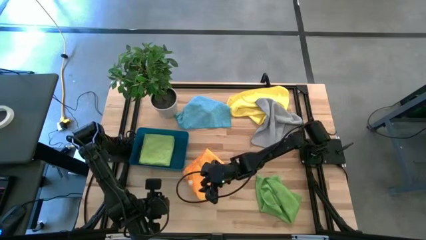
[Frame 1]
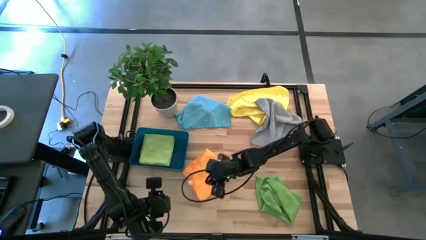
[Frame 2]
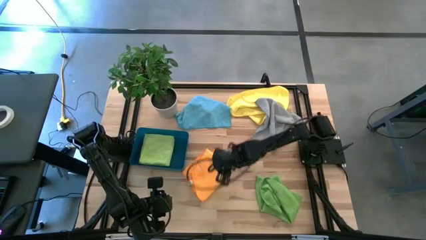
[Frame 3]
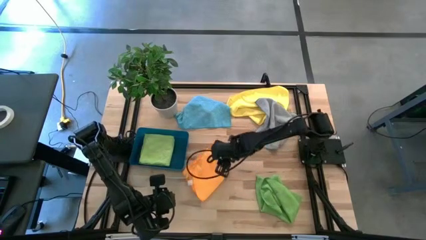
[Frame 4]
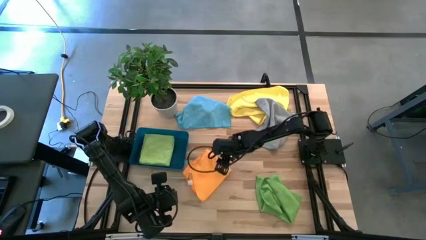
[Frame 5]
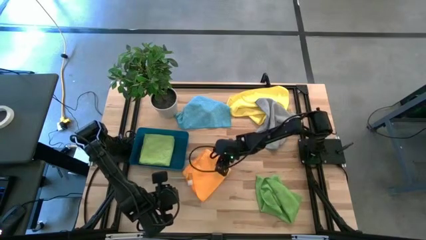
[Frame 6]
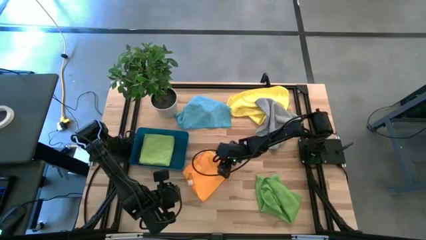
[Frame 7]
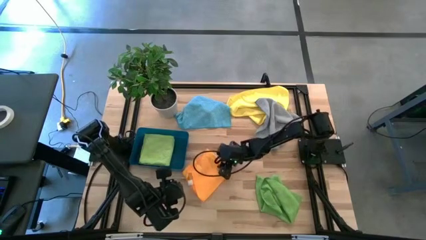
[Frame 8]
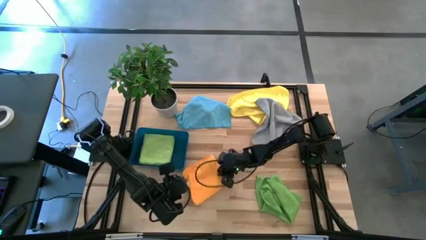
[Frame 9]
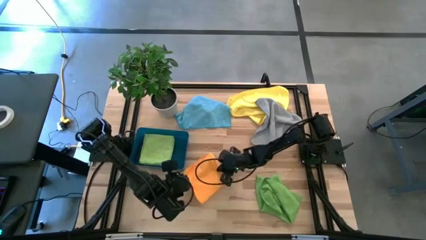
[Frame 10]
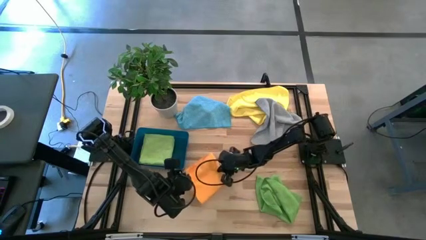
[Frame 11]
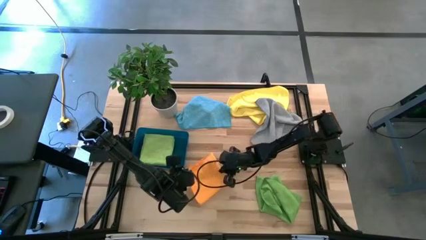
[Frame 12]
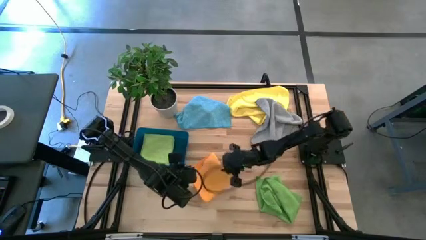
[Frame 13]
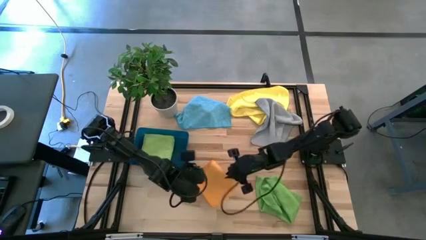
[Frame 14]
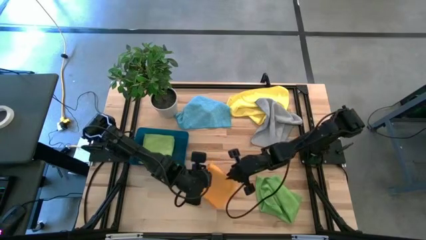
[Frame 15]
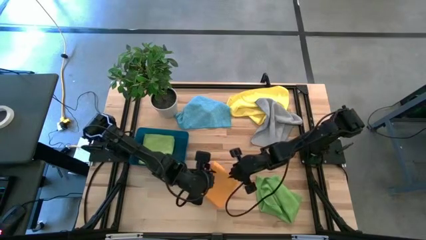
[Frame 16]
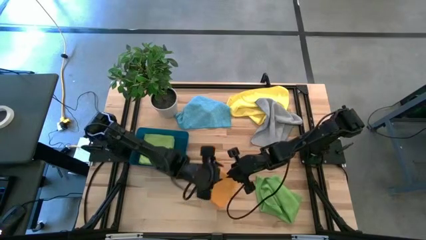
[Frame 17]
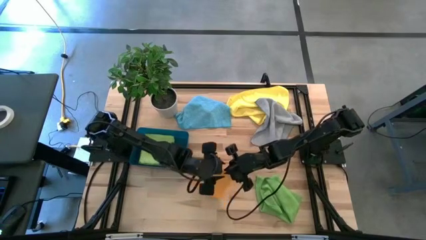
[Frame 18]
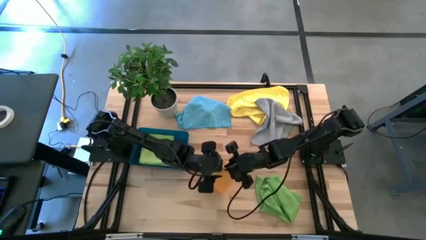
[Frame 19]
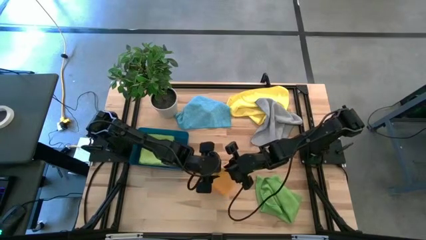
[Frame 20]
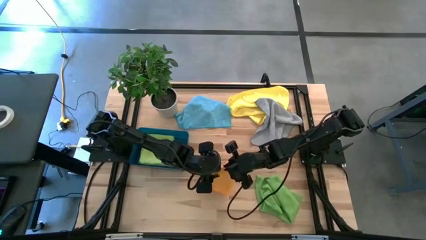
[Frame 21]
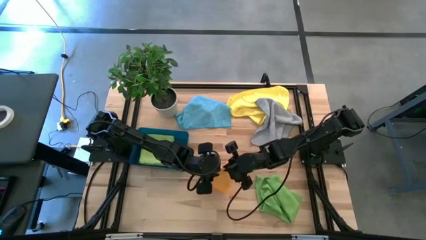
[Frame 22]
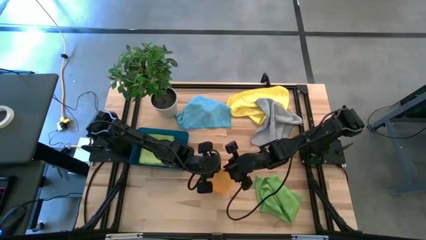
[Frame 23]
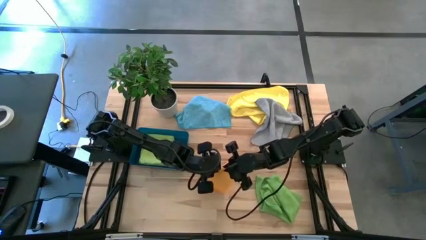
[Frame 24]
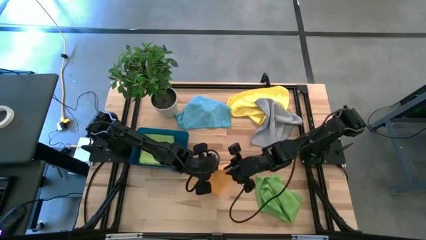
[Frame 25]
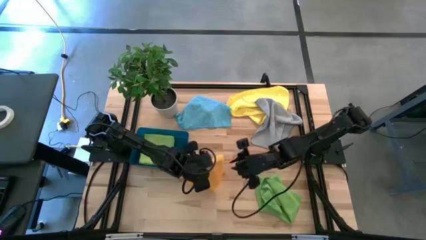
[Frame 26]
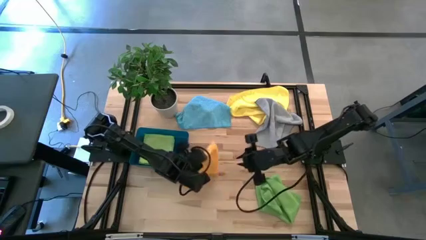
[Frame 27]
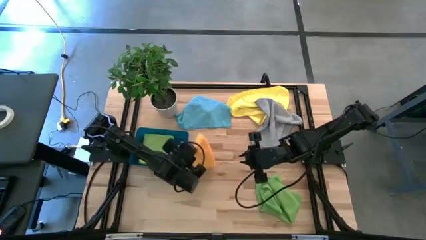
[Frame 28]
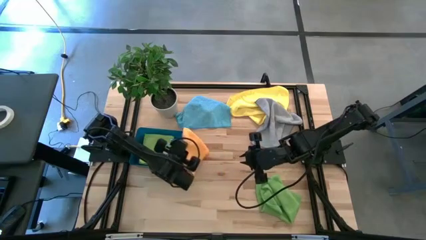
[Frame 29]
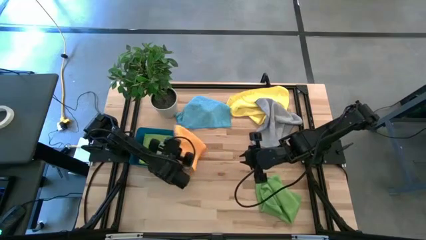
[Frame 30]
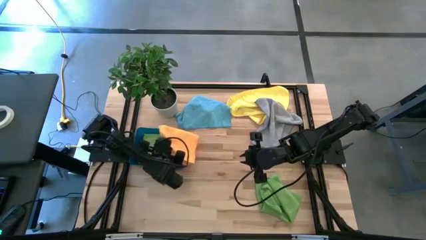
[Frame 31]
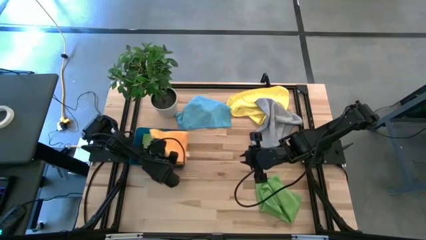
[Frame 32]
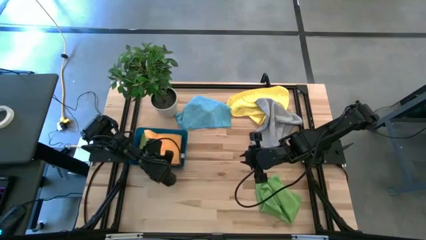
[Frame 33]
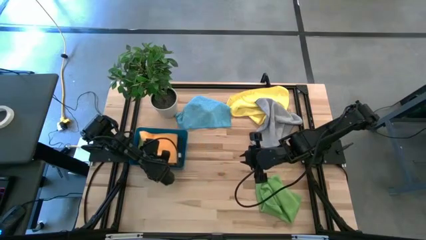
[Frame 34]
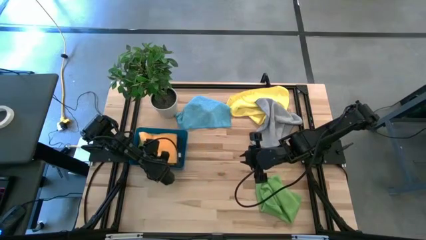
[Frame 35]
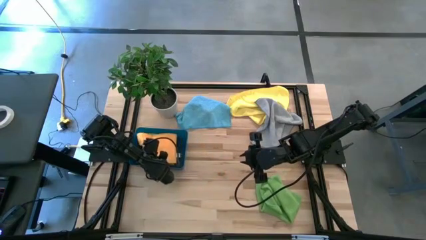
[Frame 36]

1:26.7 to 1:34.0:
Task: Fold microfiber towels
Stack the orange microfiber towel on top of the light green microfiber towel in the bin

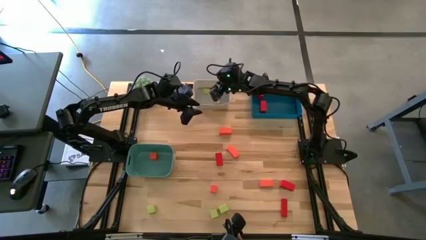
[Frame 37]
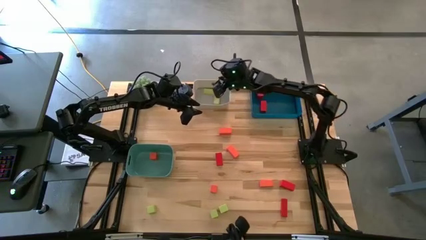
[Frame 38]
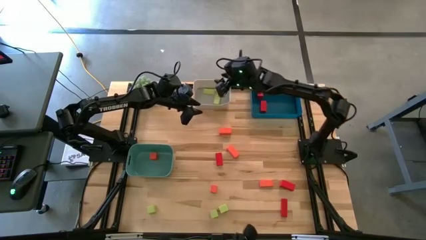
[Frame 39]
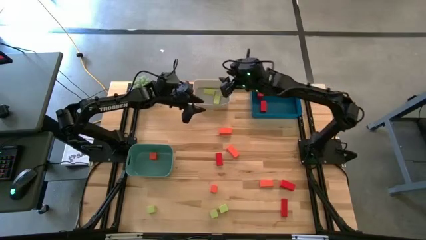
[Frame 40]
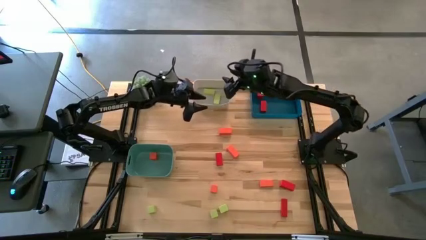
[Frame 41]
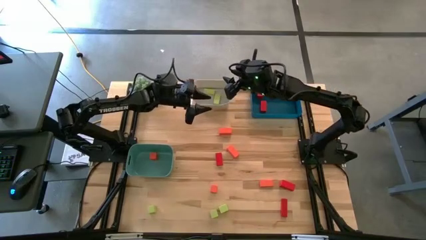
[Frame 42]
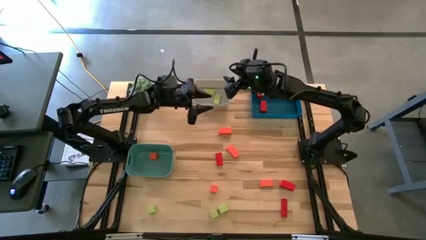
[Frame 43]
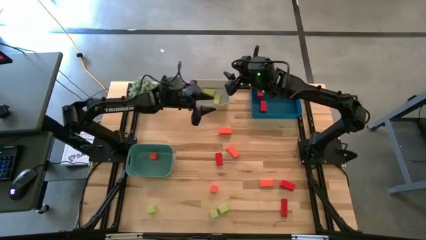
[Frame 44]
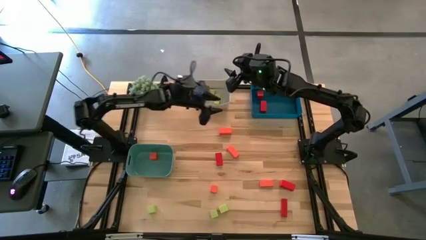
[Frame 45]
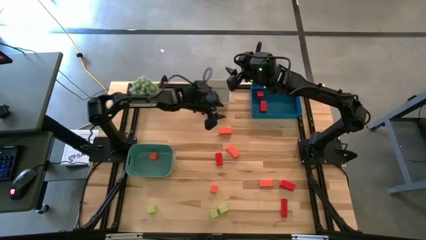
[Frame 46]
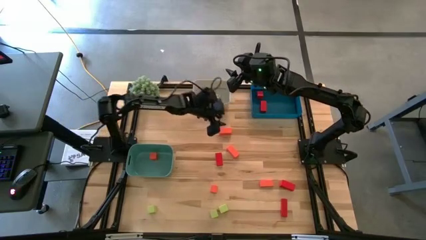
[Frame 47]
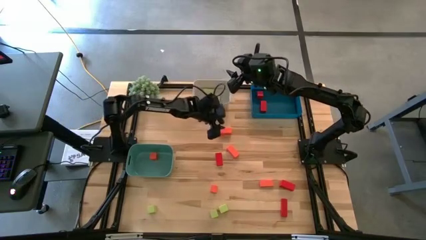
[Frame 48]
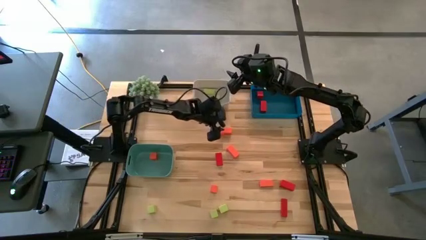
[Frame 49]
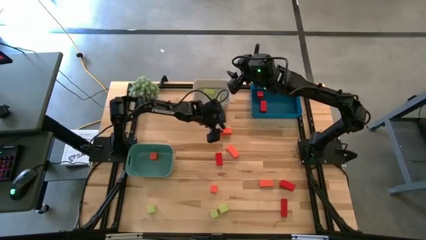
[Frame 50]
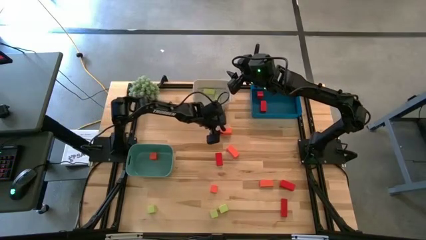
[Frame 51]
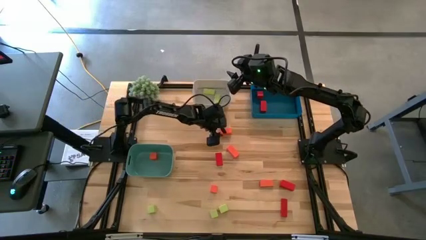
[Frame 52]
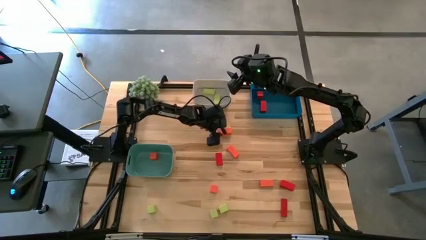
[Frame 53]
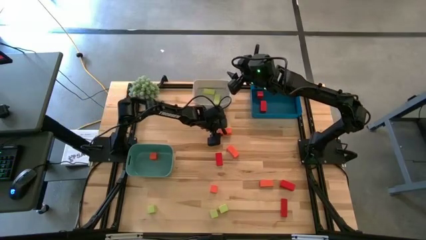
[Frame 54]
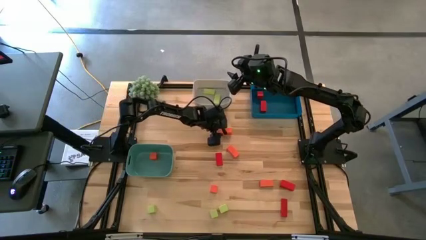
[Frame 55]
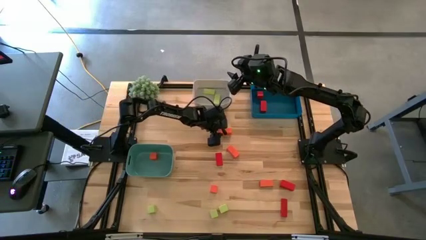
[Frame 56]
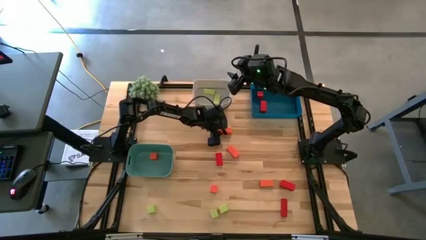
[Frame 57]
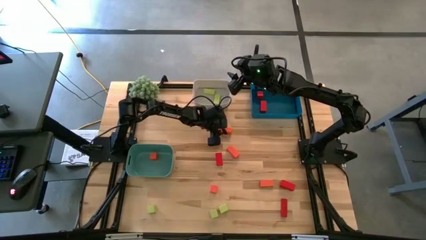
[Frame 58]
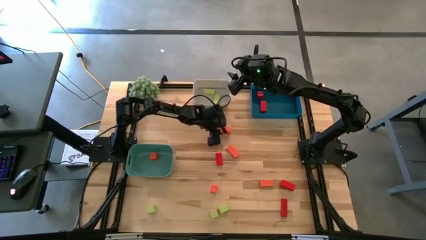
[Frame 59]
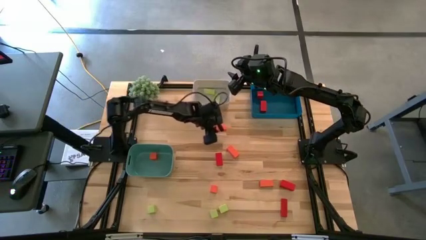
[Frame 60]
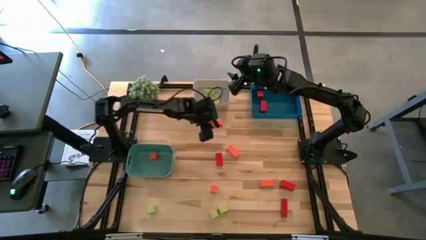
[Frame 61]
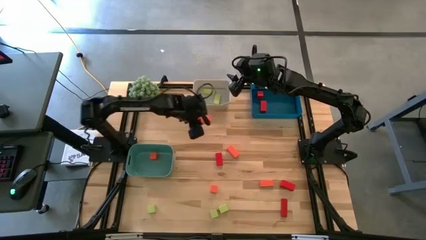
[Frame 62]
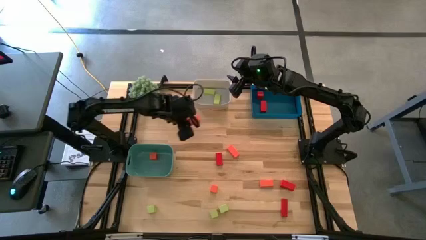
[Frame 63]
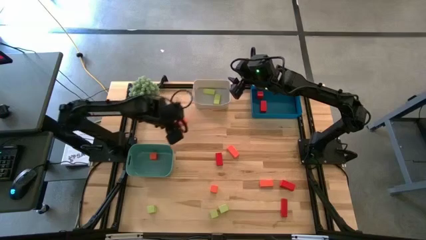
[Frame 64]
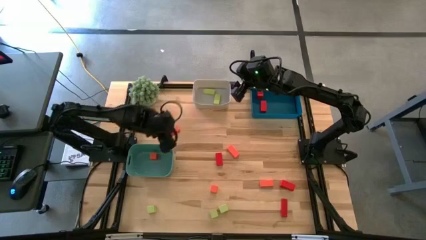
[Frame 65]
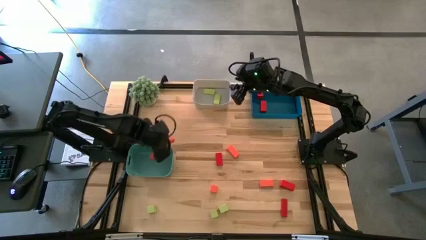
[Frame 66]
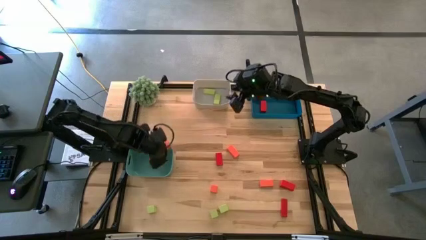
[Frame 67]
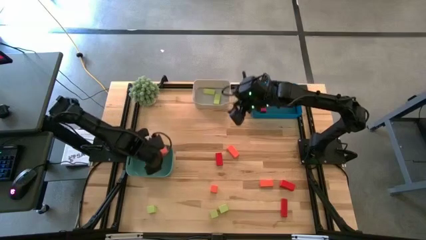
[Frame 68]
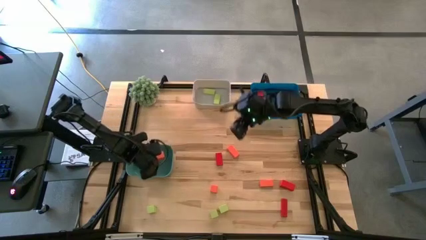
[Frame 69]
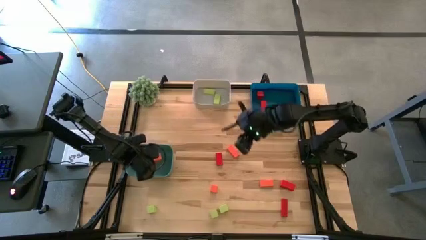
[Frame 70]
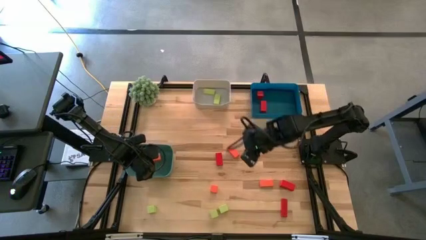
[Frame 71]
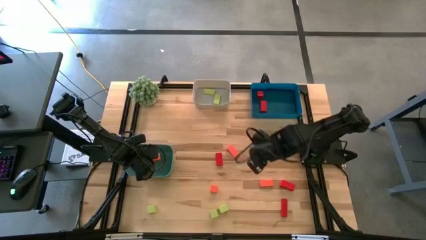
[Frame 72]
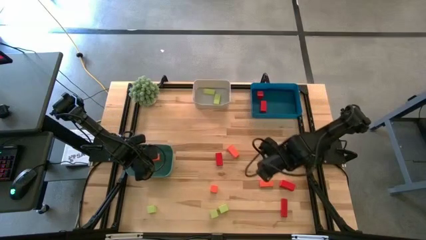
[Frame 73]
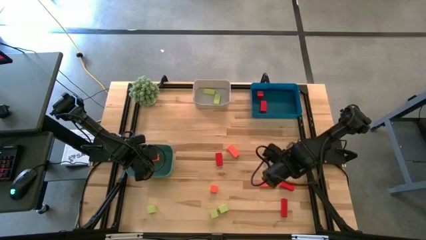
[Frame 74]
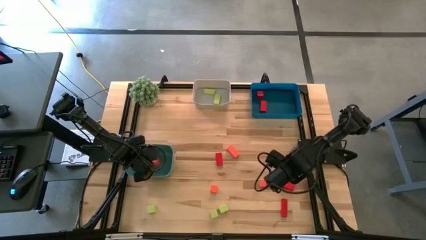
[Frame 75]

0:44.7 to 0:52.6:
Task: Sort & place blocks by color
Put the orange block into the green bin
